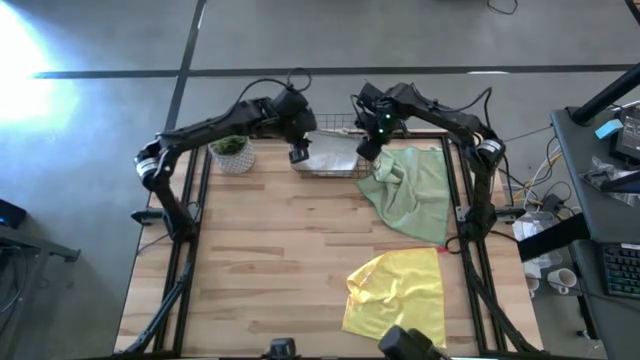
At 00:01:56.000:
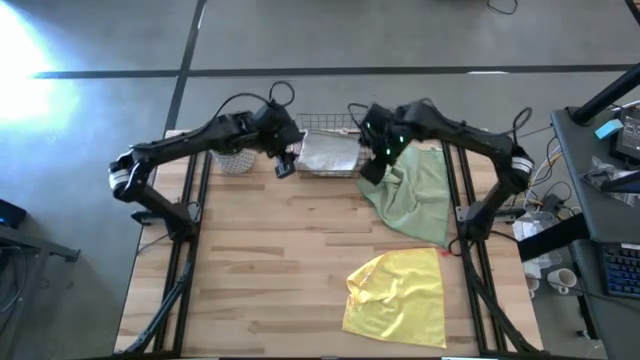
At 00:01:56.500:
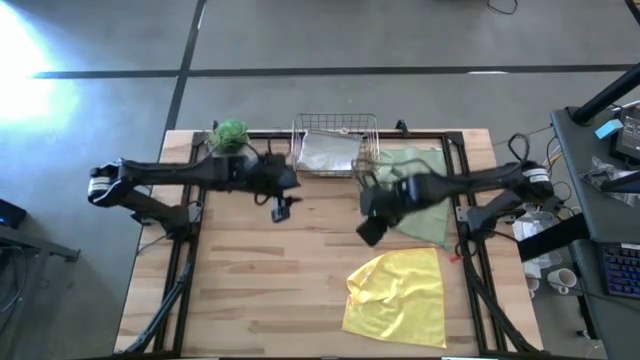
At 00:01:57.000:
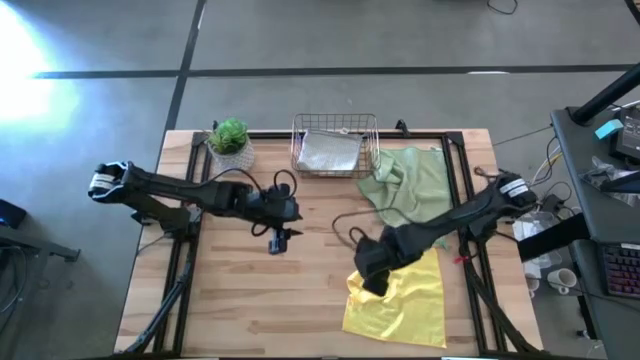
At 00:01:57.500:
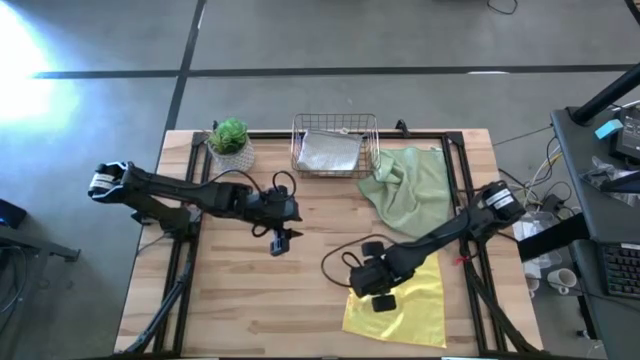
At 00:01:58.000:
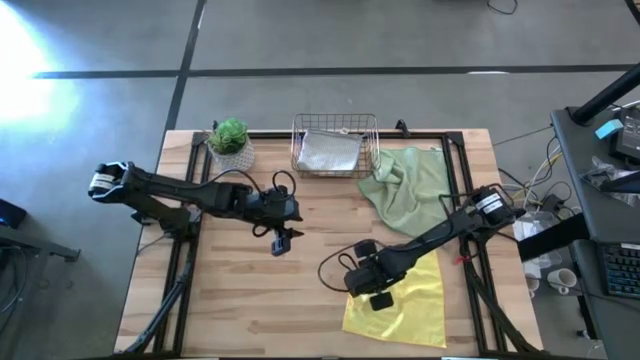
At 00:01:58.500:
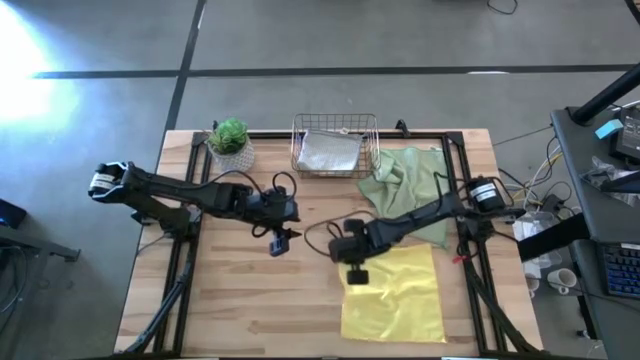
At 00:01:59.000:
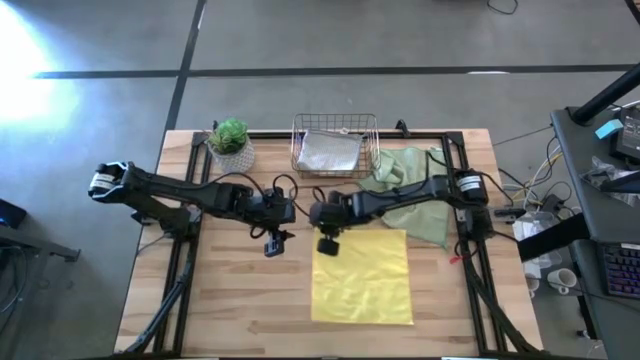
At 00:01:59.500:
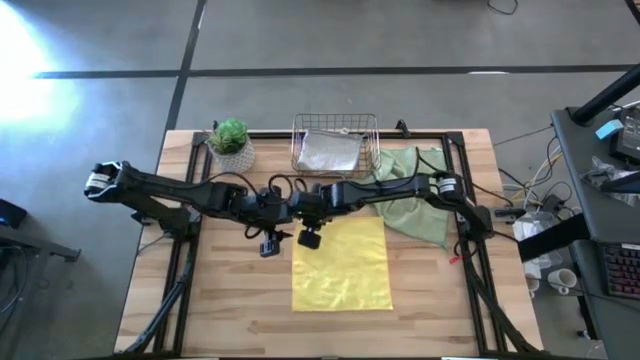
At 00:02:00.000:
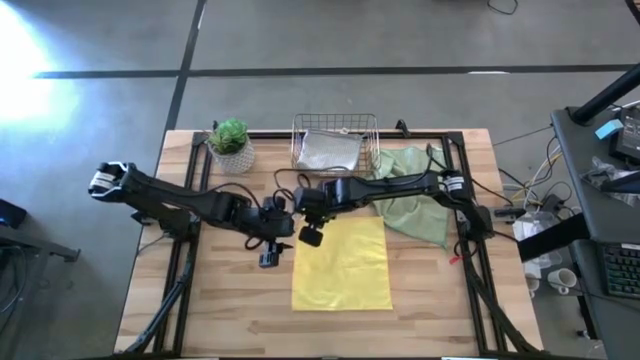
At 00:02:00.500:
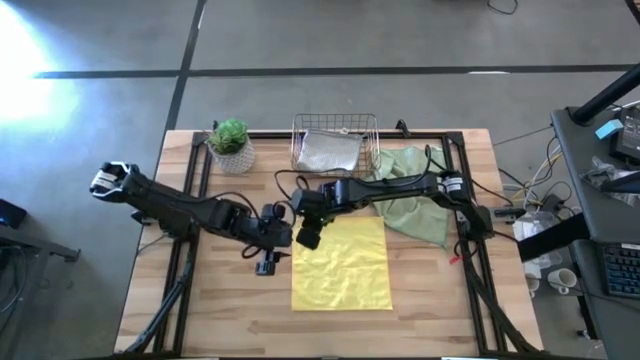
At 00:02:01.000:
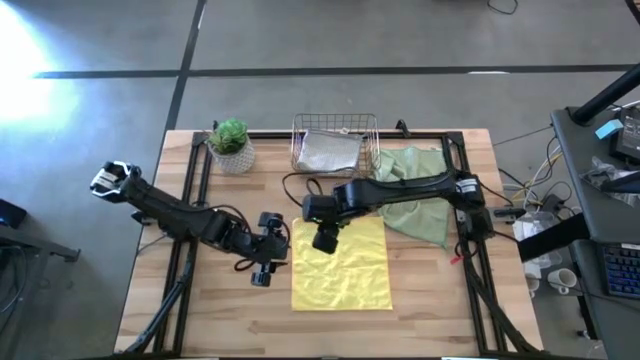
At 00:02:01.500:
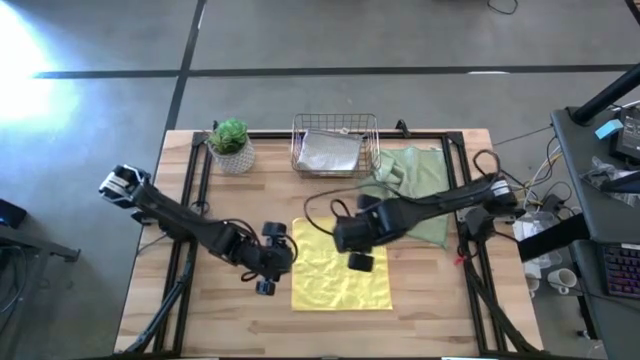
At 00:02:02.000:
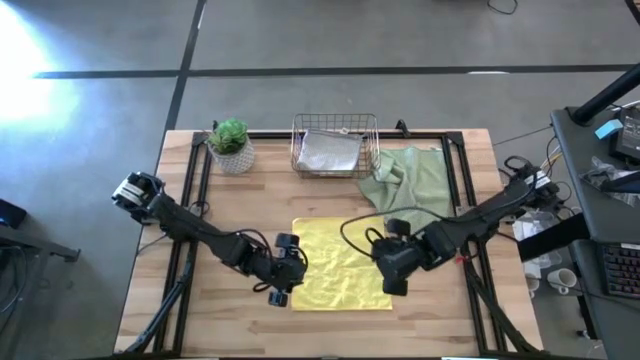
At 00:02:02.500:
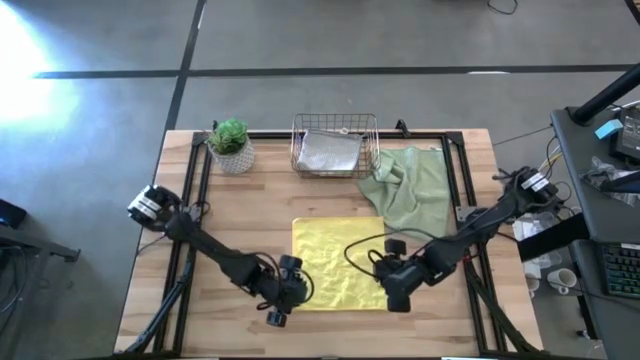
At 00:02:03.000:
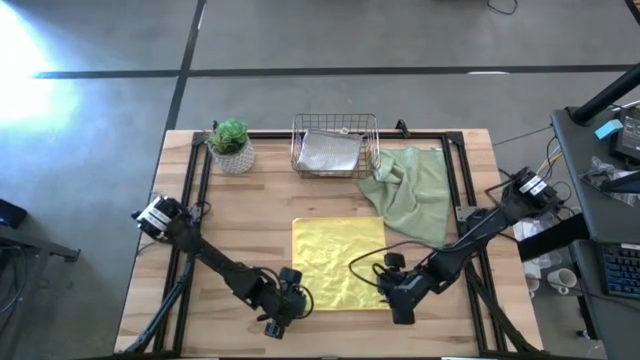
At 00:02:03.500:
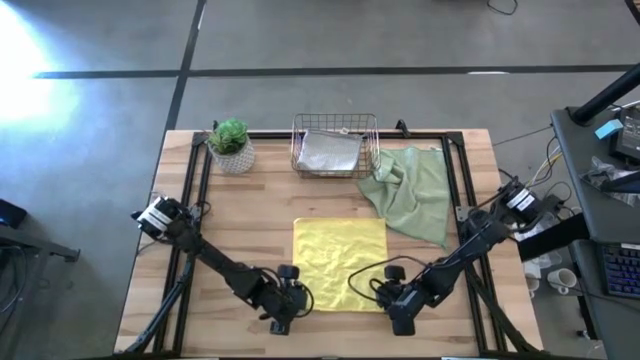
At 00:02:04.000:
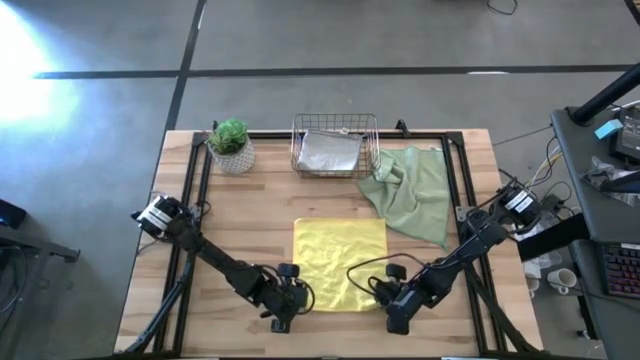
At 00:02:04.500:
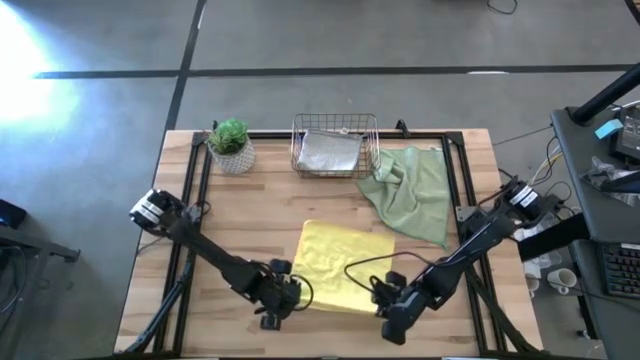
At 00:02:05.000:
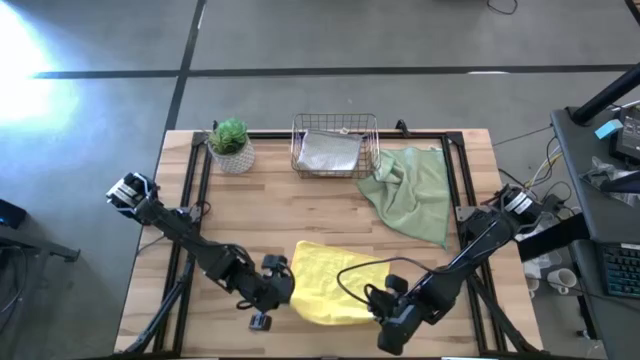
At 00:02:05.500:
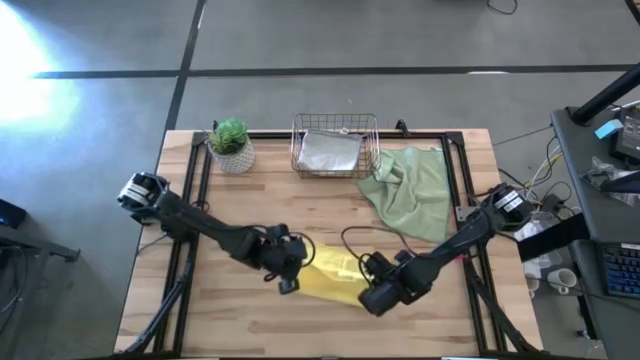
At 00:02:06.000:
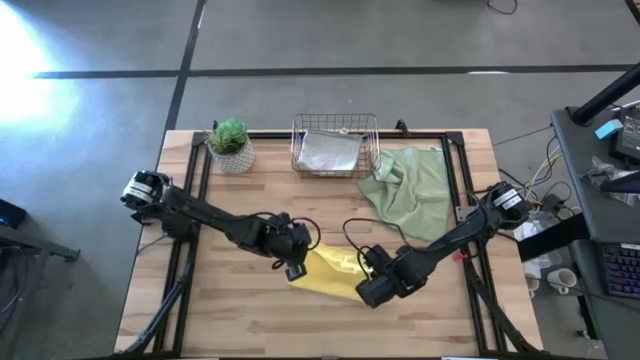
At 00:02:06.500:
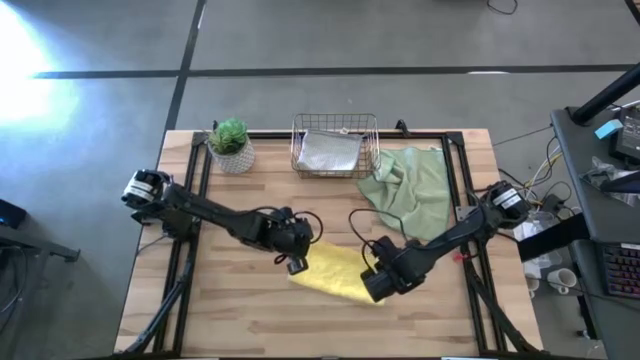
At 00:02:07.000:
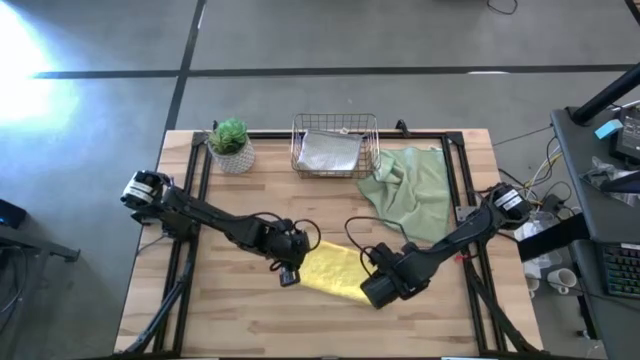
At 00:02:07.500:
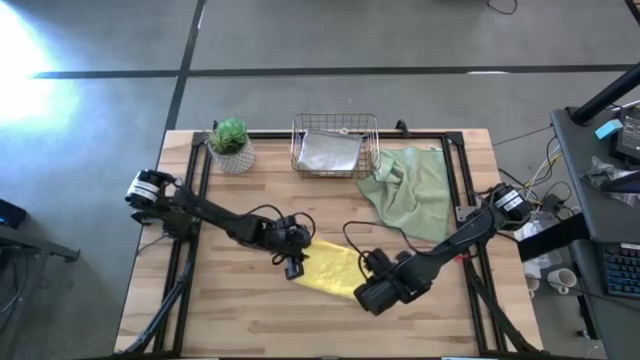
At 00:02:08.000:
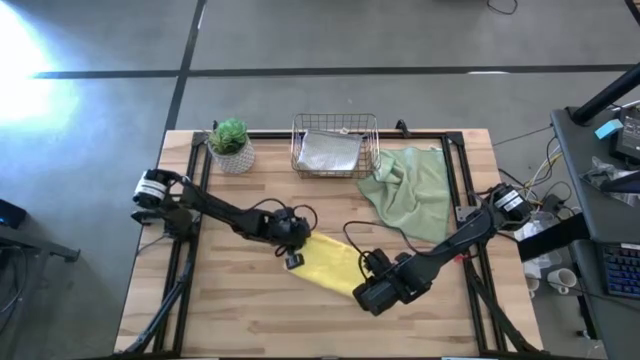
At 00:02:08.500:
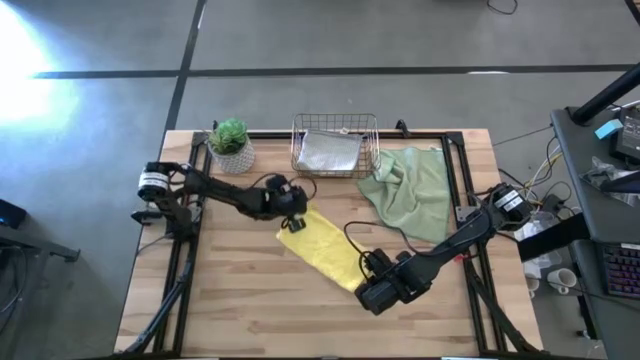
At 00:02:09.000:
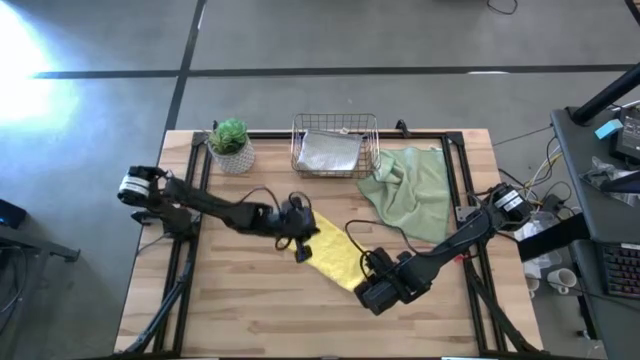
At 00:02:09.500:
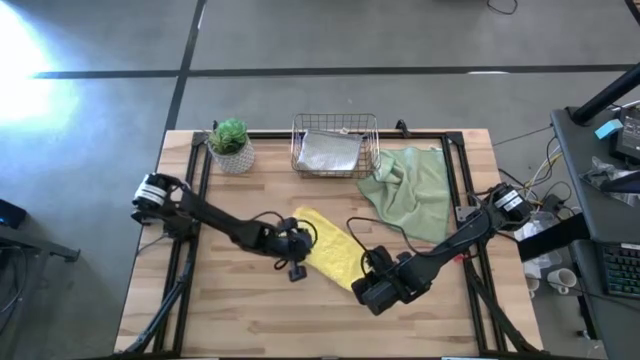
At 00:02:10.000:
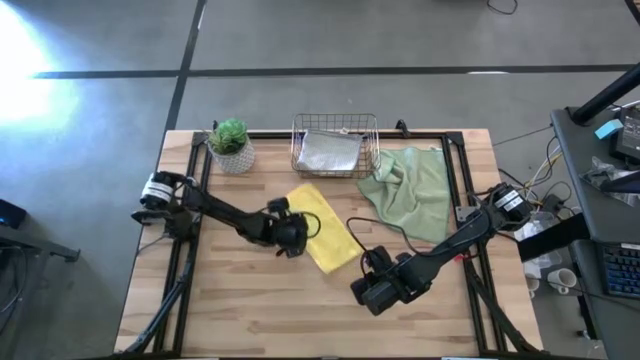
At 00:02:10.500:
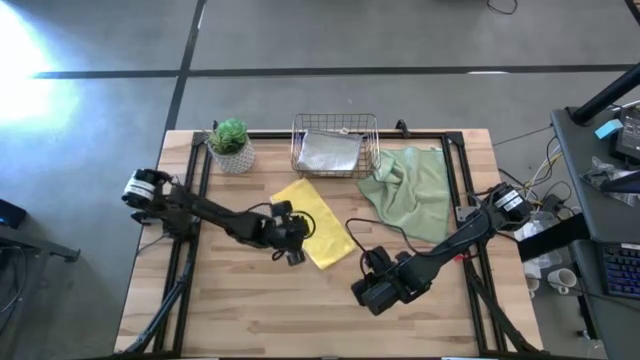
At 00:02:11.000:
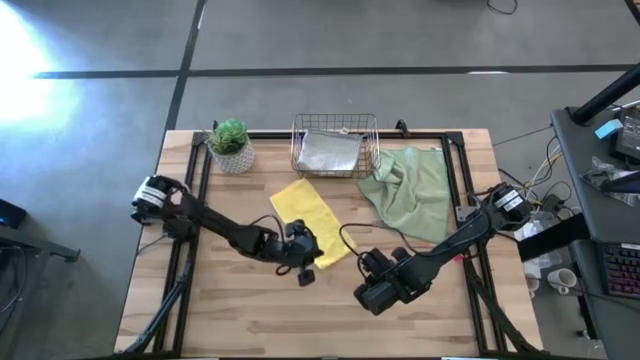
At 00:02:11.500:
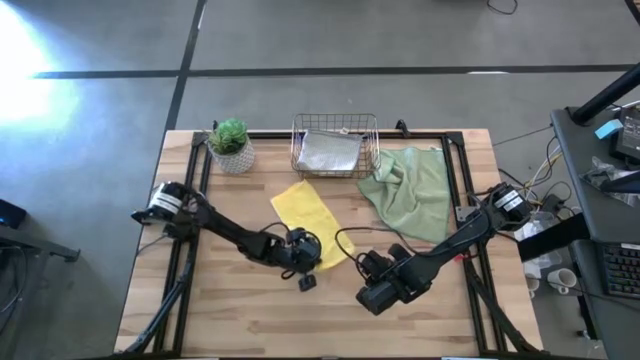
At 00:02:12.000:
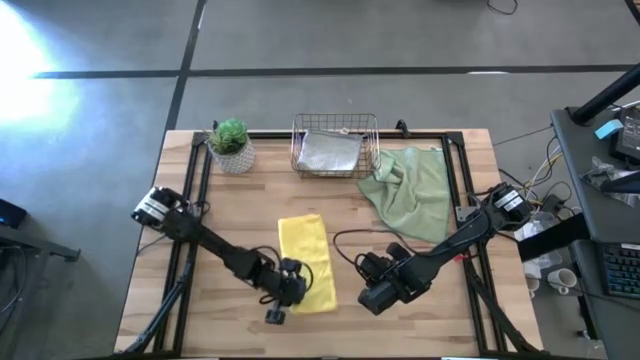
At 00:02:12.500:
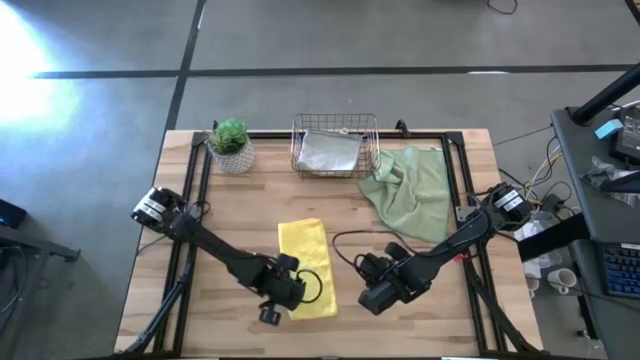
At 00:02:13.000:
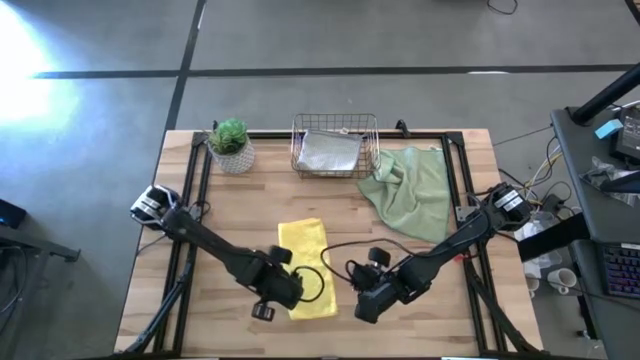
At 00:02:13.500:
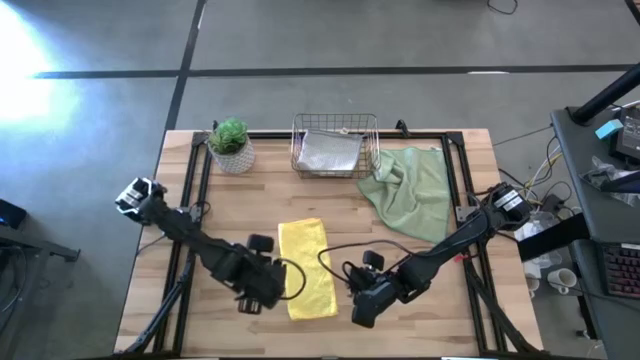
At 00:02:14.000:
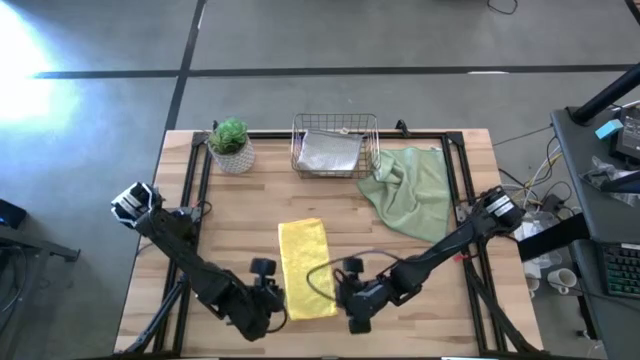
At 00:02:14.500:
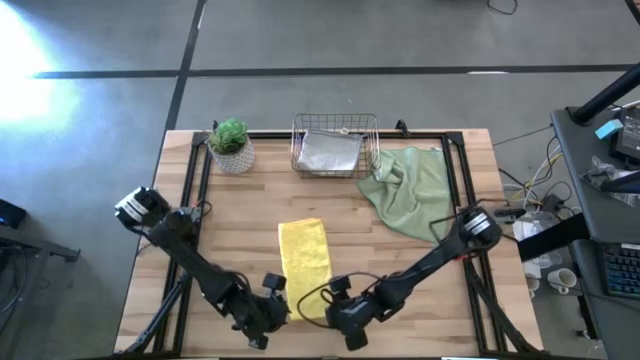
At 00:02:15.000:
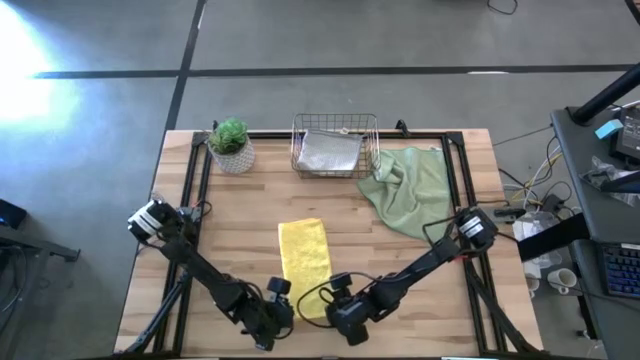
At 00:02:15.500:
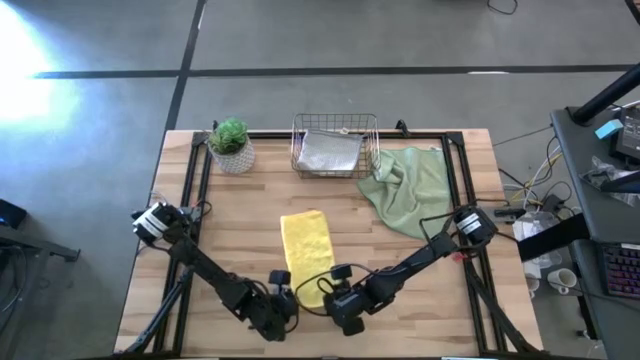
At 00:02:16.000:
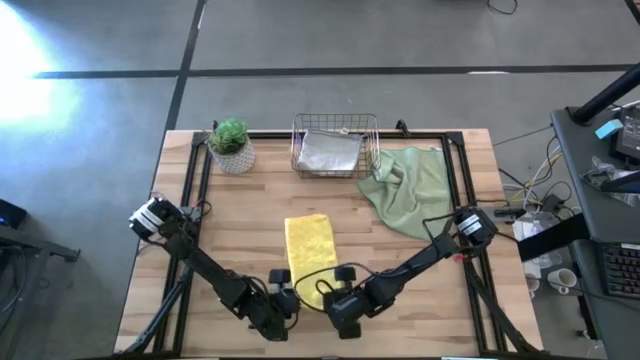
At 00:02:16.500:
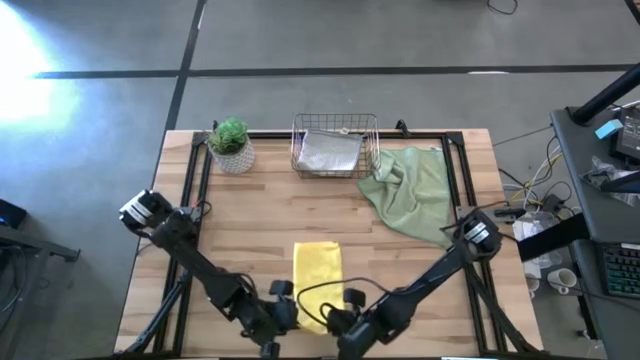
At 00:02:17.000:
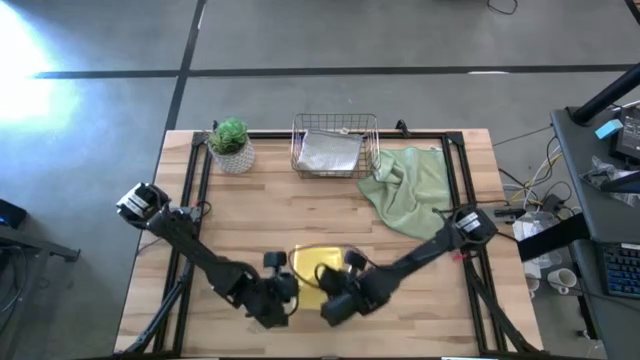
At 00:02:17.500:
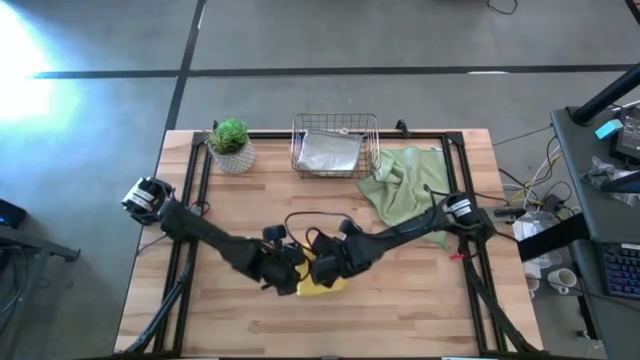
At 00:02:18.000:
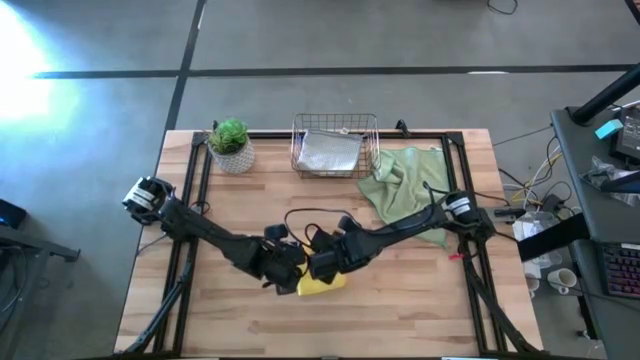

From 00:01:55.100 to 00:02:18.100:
Task: Fold microfiber towels
Fold the yellow towel
